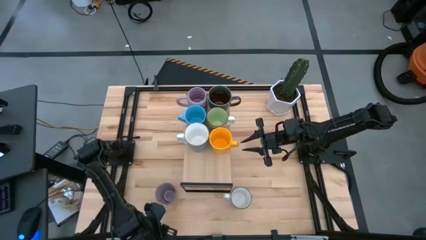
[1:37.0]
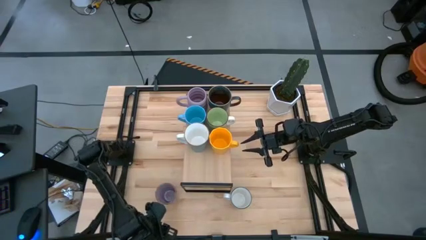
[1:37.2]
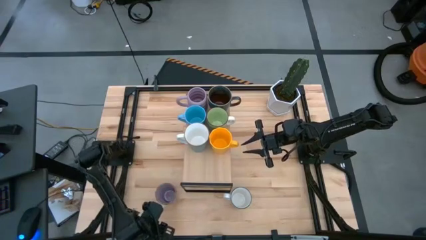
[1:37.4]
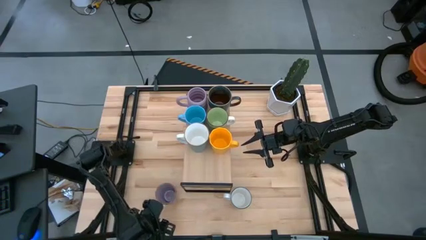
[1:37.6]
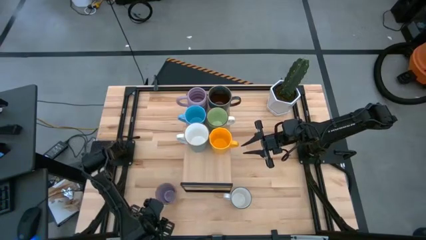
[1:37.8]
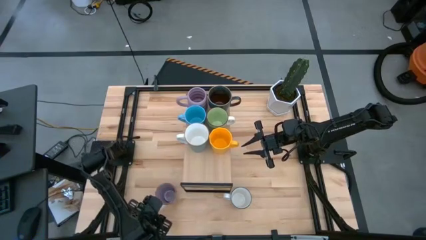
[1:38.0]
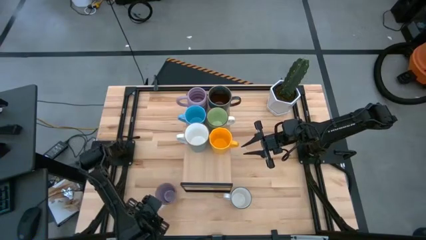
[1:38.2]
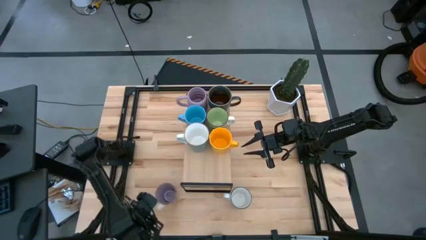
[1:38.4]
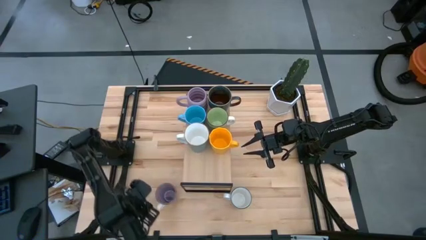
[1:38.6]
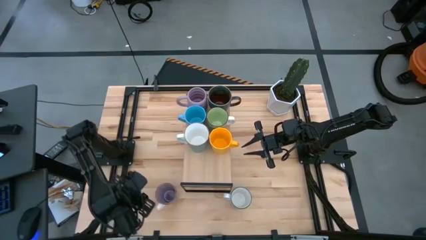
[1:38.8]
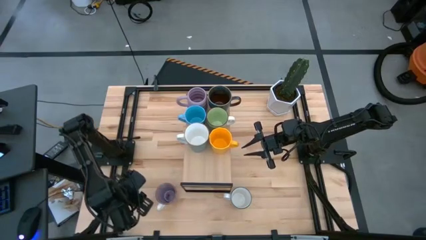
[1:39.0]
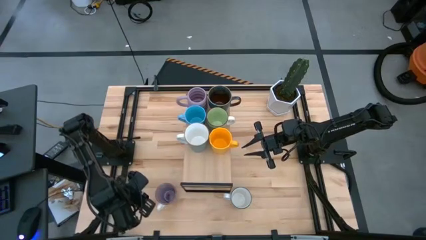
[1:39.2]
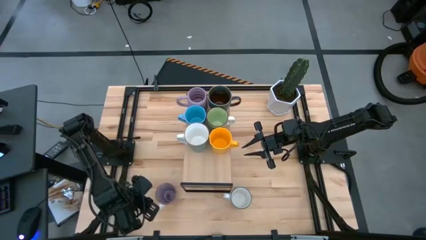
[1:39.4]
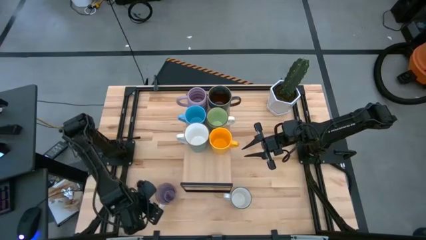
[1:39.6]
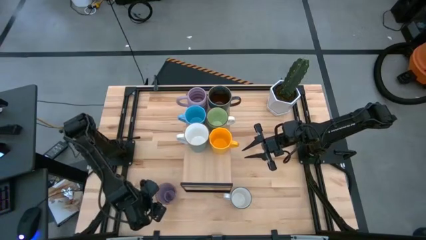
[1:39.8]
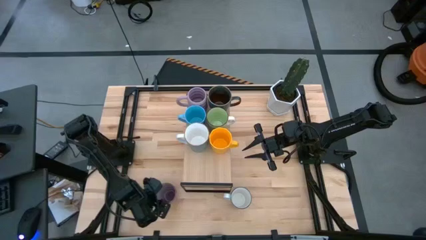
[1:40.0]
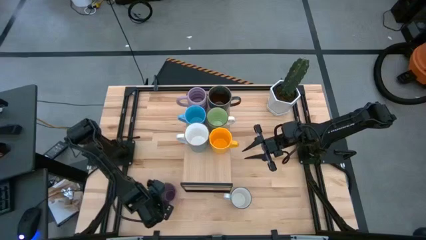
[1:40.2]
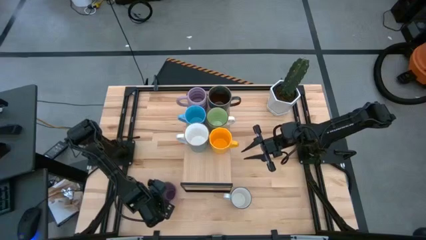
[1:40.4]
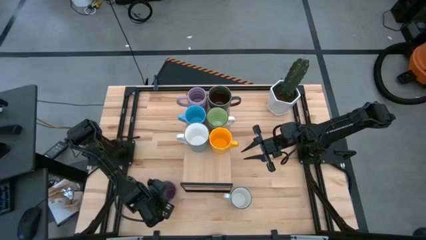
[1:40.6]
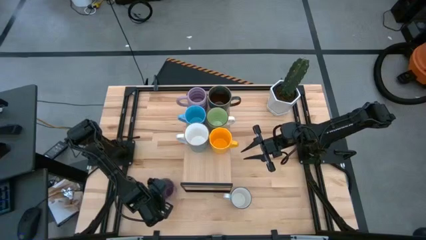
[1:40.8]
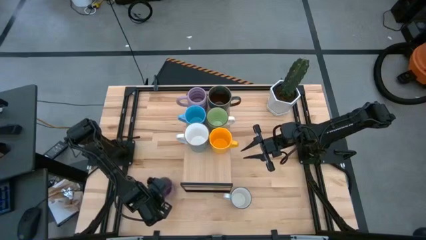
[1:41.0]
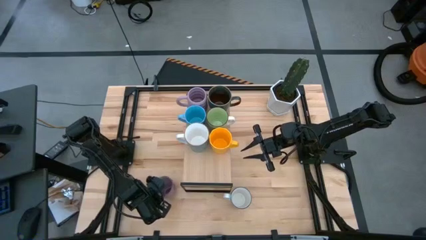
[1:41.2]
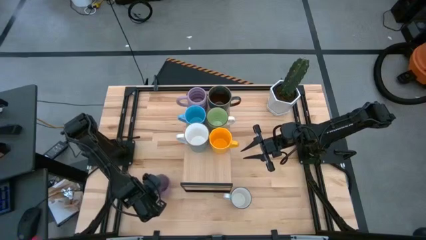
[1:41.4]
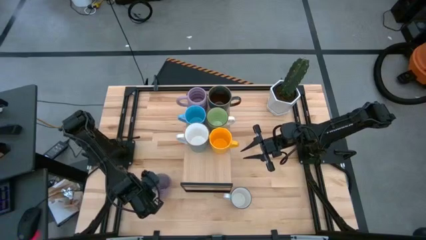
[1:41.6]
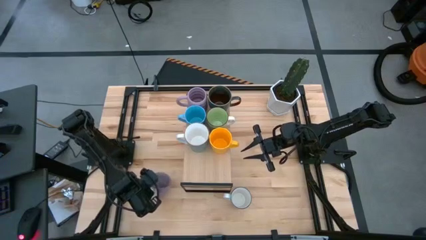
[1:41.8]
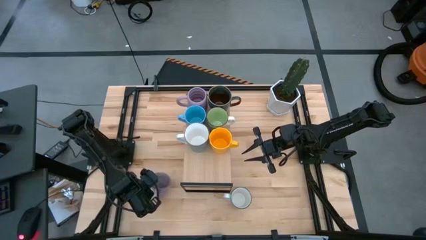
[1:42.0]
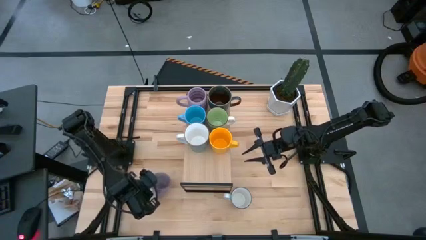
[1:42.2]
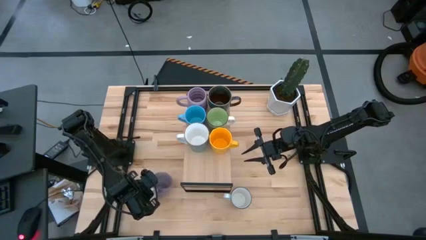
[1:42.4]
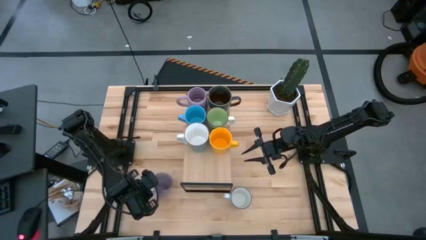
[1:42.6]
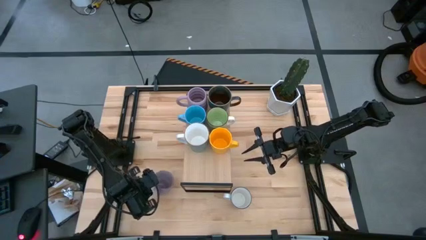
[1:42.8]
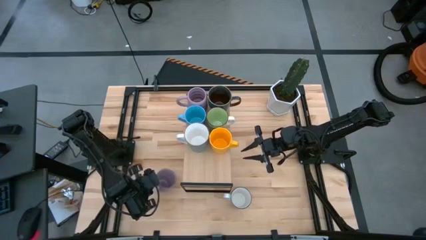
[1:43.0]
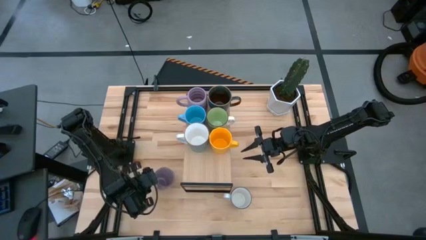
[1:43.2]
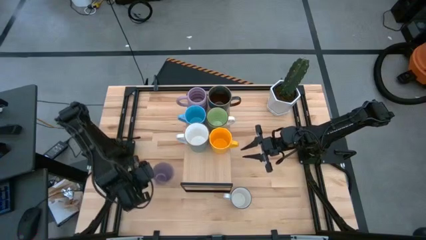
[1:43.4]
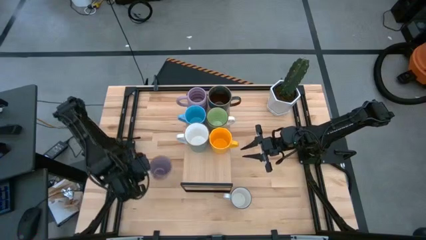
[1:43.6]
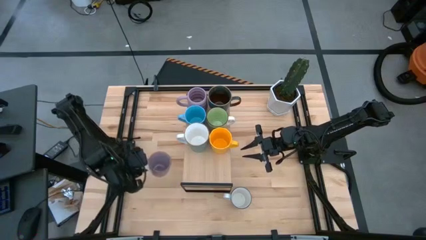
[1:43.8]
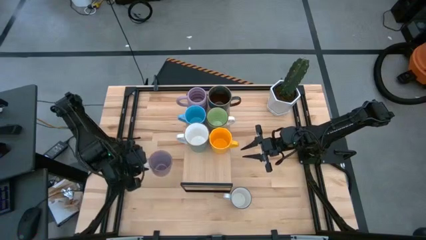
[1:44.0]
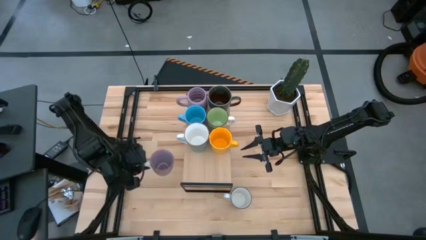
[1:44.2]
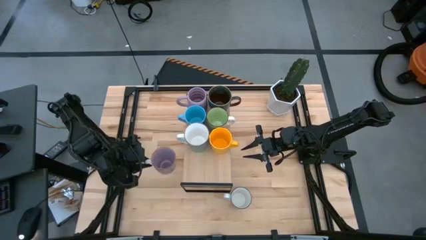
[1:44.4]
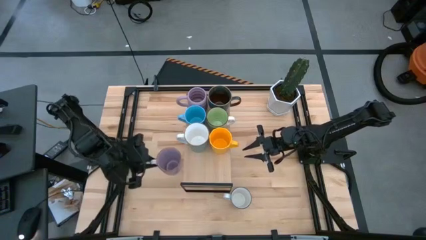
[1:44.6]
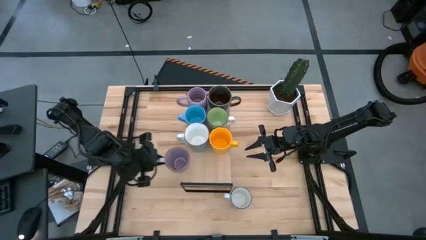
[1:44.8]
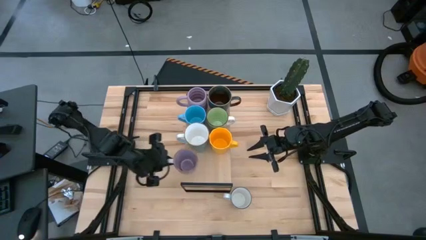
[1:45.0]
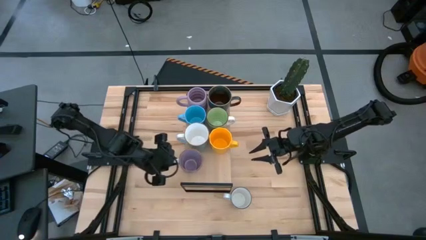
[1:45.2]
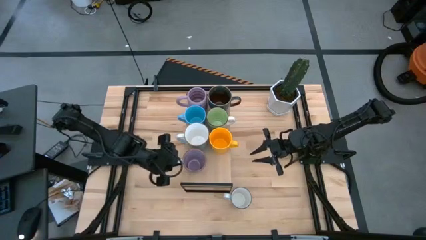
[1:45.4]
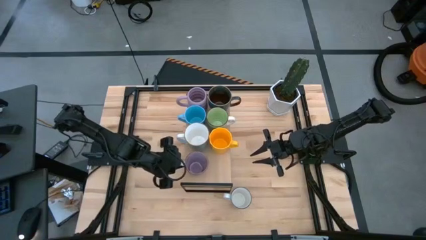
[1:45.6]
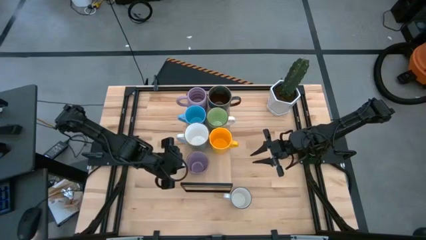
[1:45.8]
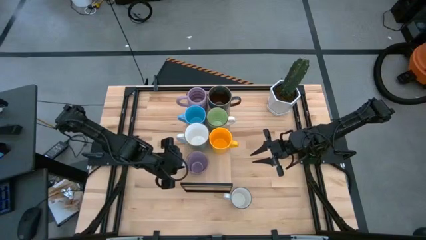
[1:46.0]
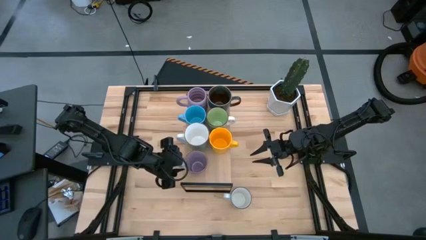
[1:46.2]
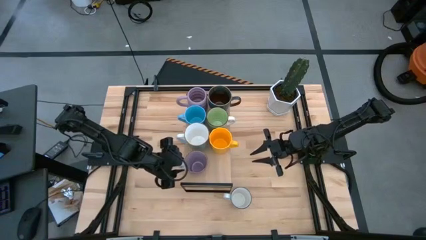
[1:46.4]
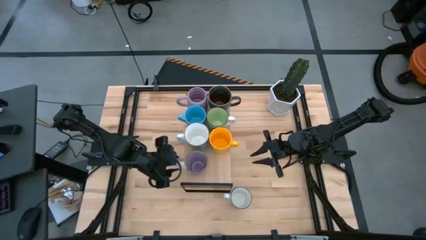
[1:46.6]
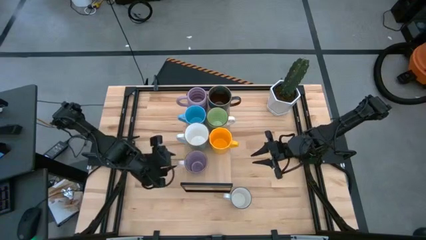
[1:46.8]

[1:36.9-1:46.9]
Task: Place coffee mugs
Put the purple mug on the shelf

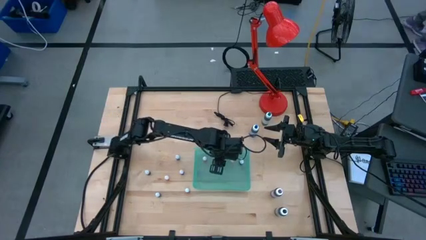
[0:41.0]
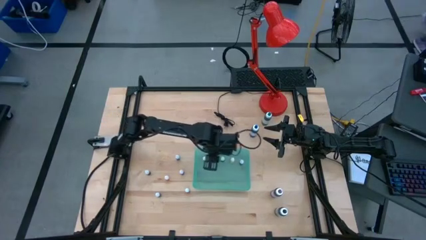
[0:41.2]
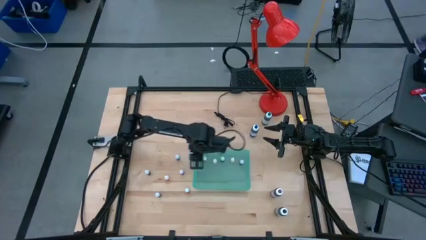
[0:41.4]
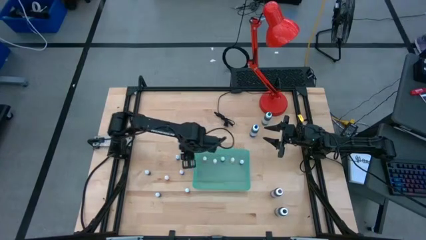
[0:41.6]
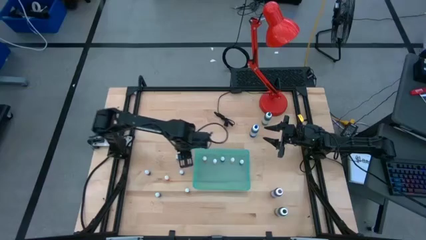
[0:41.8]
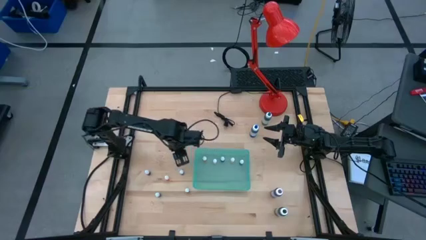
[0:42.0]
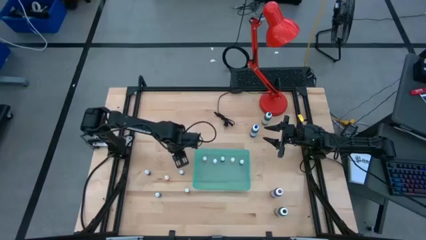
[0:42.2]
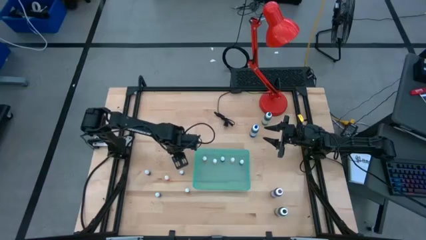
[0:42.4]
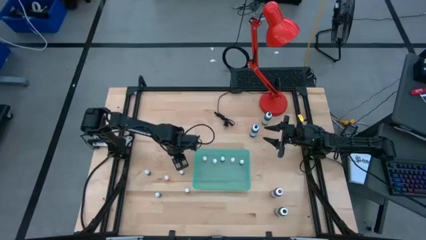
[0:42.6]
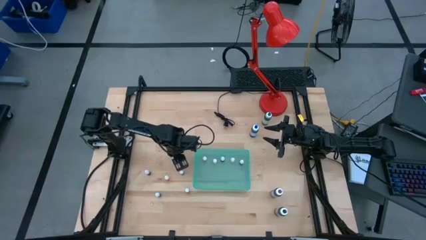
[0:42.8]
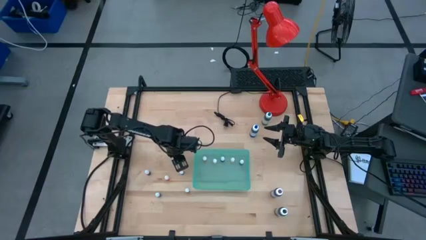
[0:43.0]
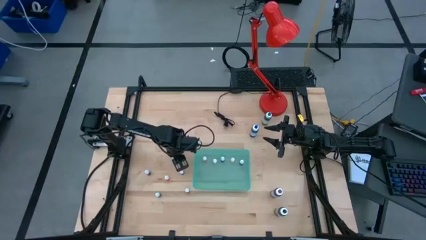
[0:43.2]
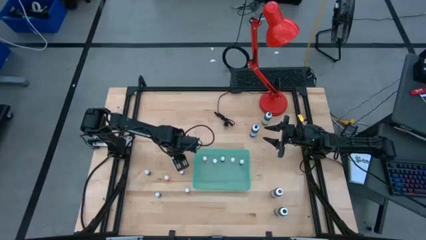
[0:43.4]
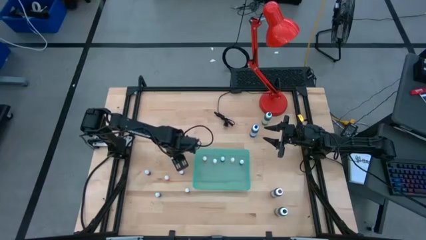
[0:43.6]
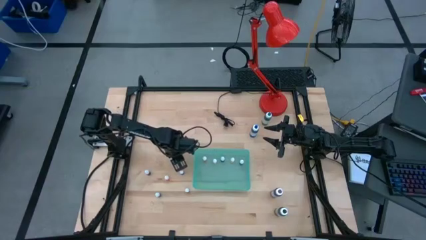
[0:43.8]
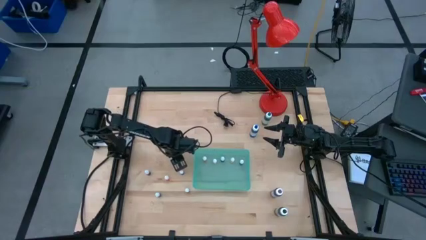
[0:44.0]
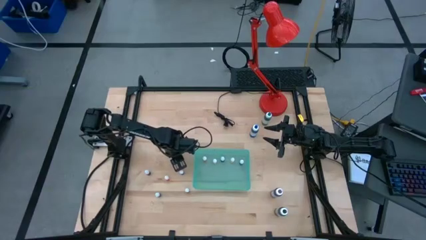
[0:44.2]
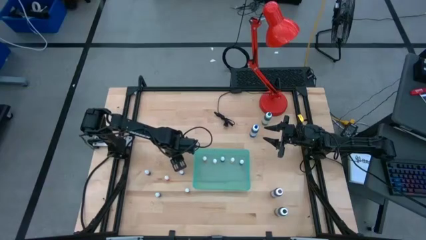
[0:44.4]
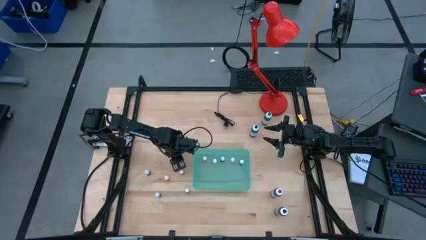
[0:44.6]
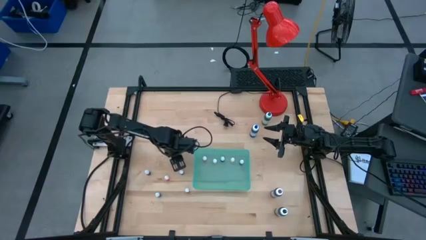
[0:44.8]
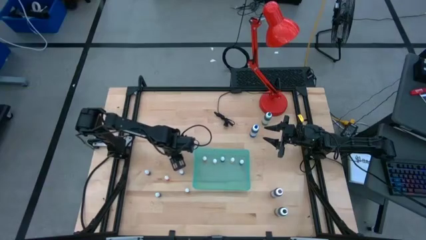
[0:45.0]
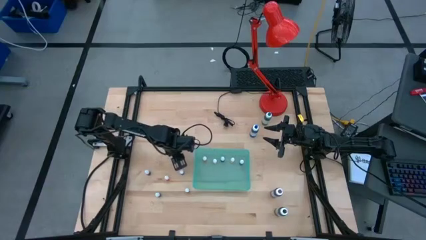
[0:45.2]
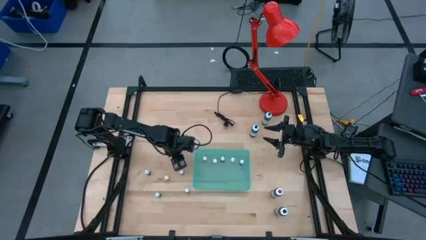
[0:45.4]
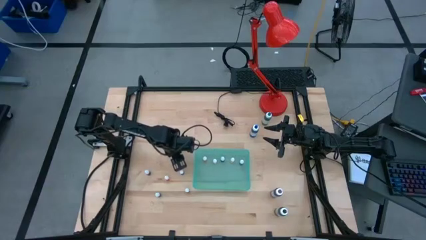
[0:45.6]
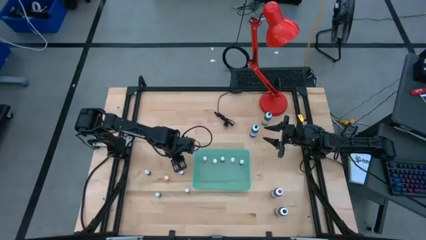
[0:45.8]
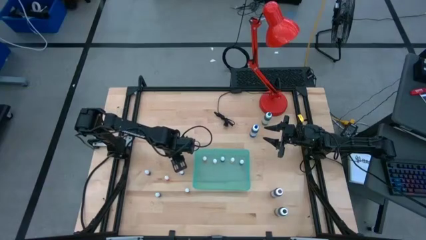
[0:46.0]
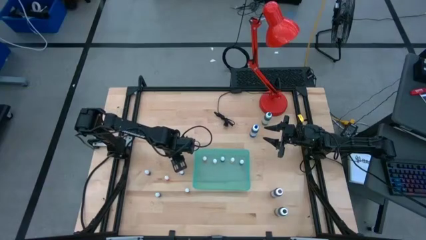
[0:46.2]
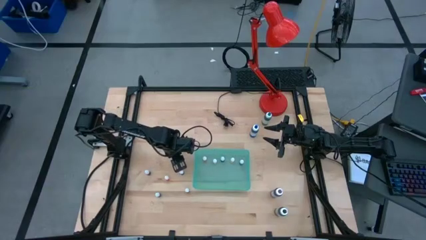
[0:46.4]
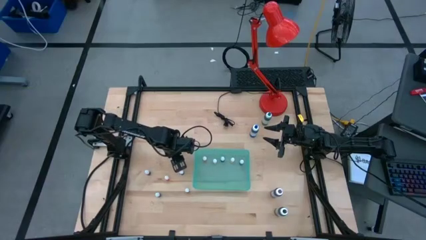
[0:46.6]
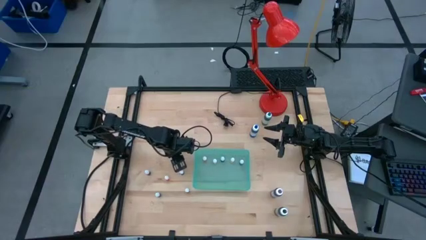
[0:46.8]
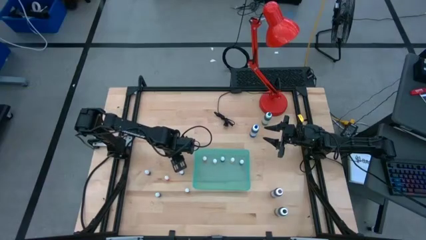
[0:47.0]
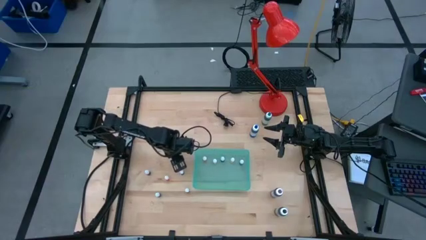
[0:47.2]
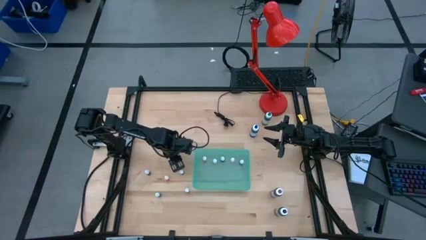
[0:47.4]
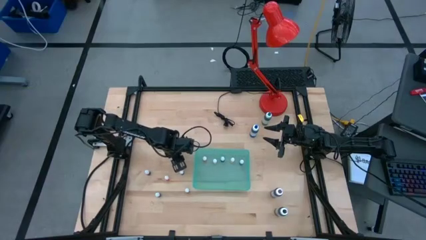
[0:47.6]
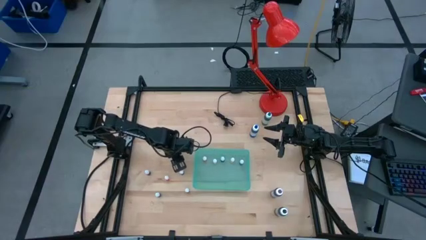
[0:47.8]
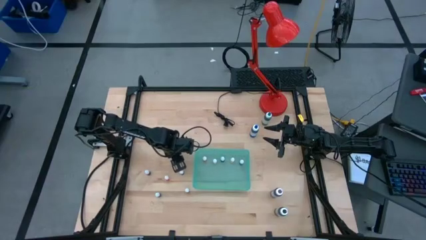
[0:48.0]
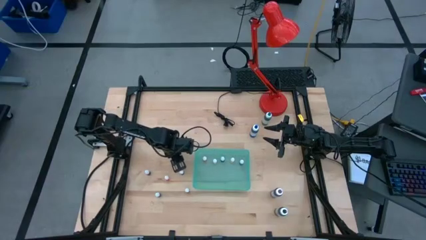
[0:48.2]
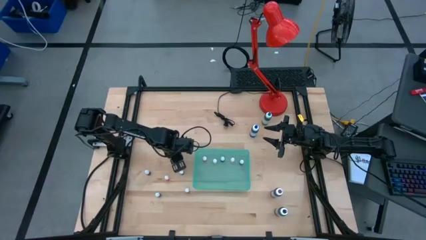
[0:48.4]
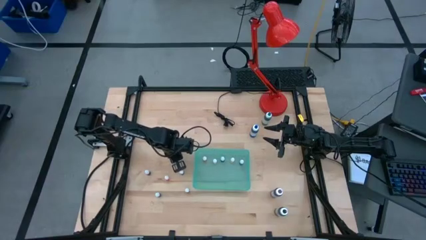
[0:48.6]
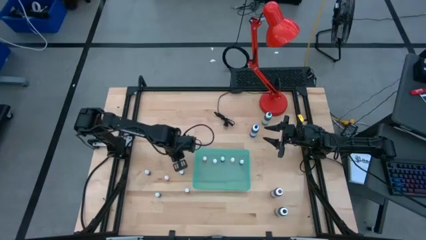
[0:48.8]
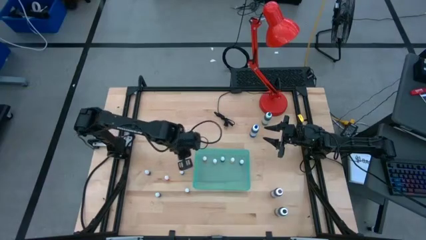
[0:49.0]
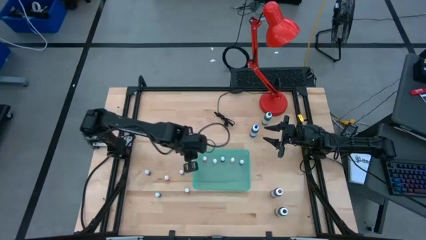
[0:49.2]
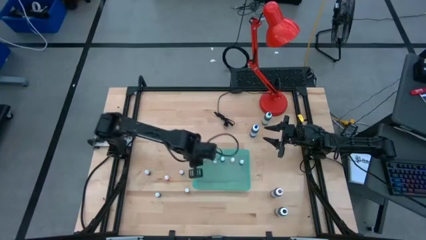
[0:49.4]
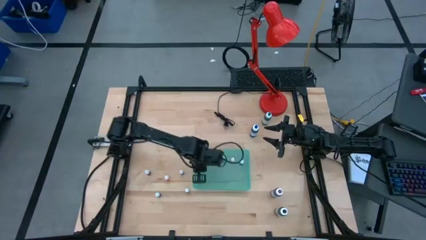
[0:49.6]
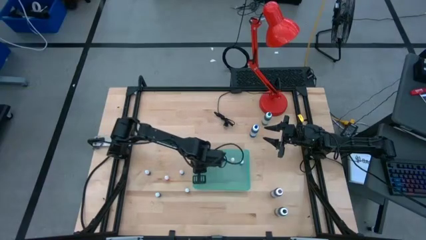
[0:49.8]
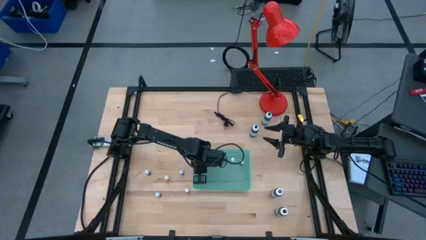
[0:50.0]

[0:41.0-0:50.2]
Task: Pick & Place food coloring
Put the small white food coloring bottle into the light blue bin
